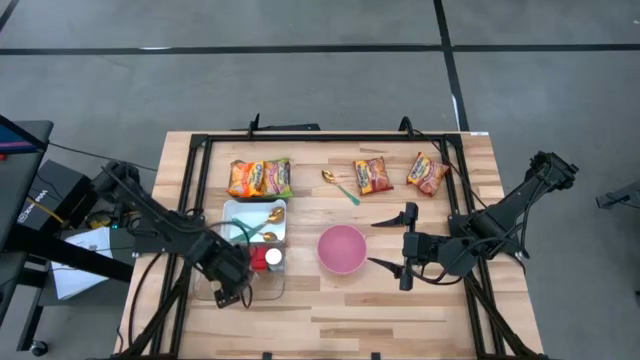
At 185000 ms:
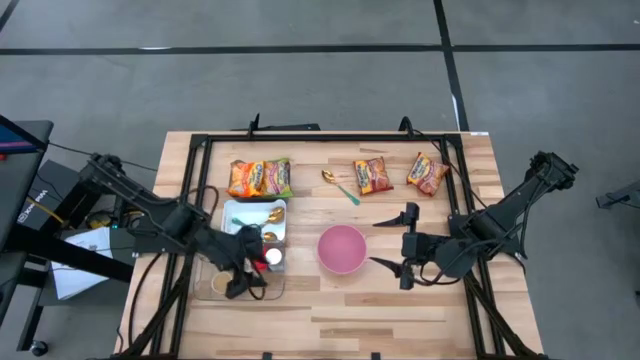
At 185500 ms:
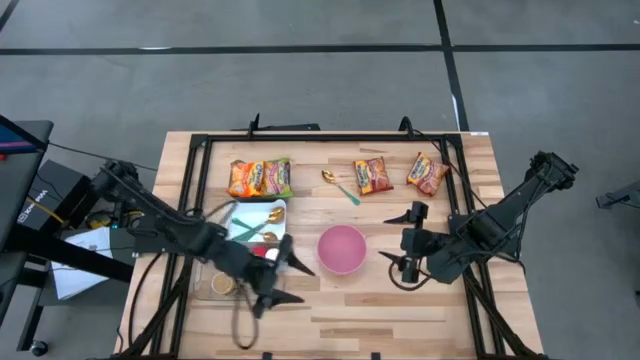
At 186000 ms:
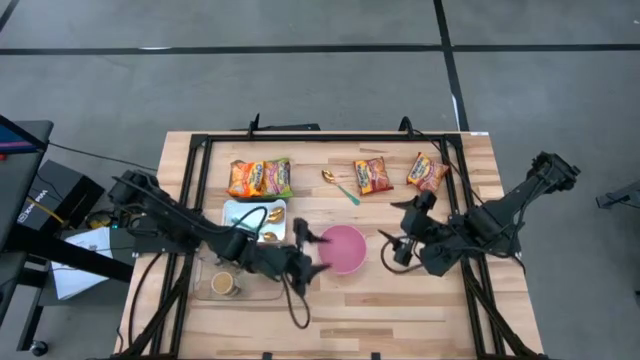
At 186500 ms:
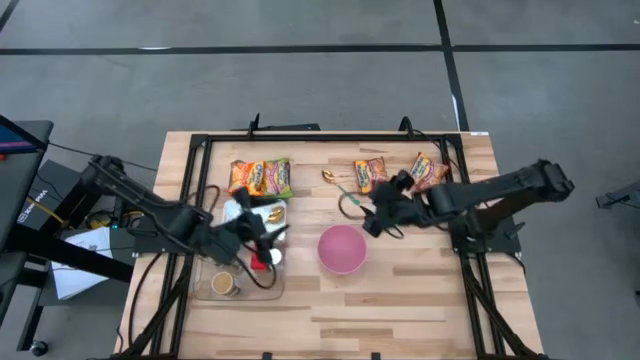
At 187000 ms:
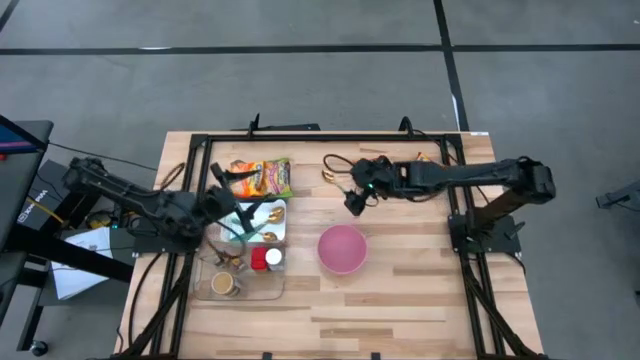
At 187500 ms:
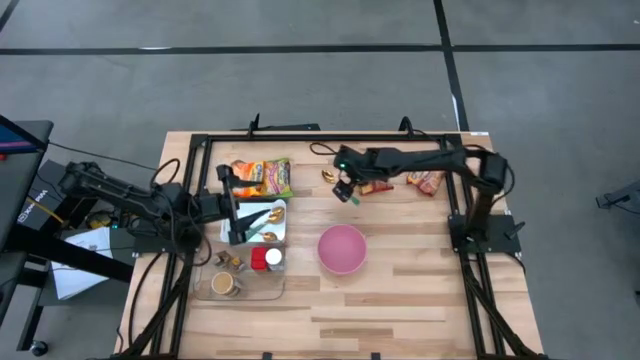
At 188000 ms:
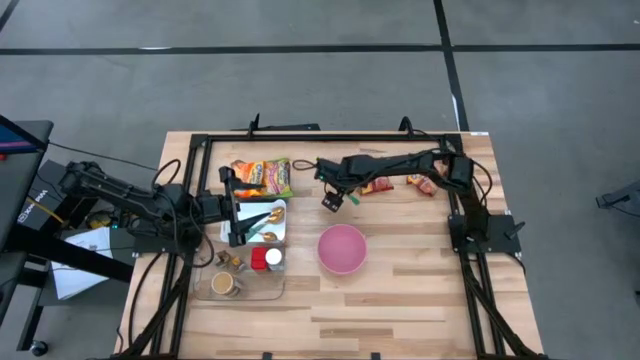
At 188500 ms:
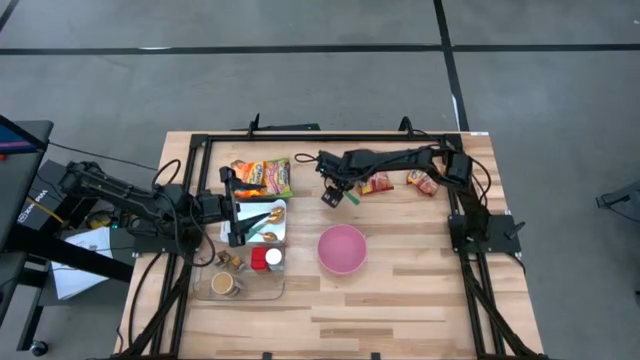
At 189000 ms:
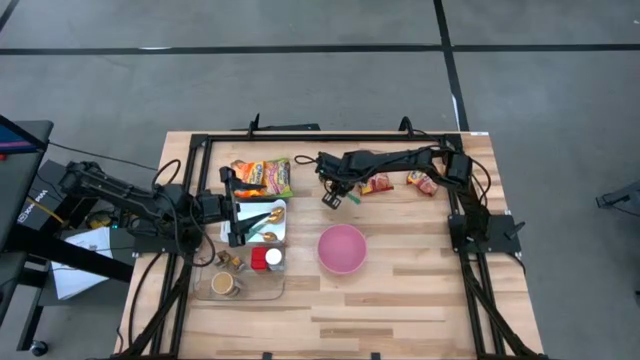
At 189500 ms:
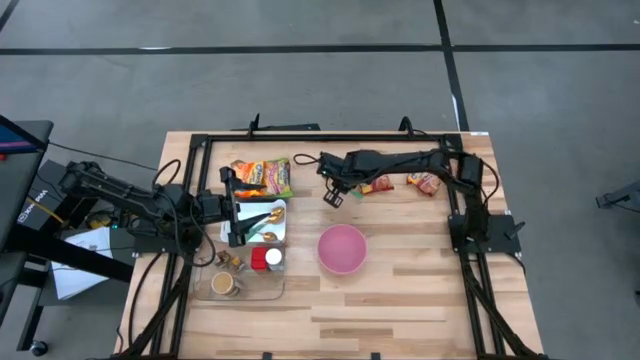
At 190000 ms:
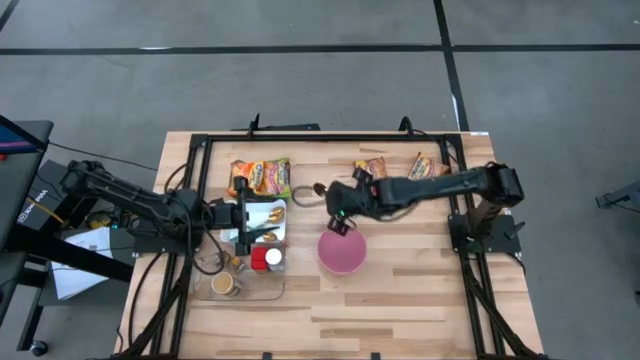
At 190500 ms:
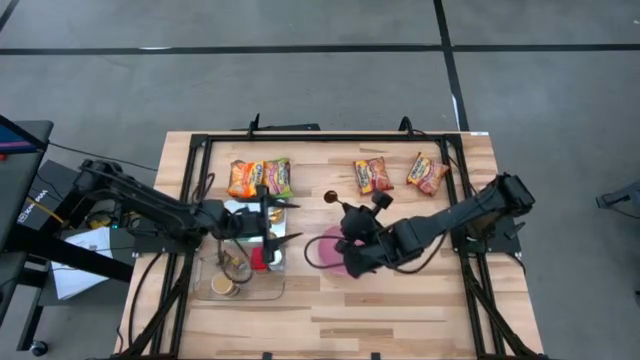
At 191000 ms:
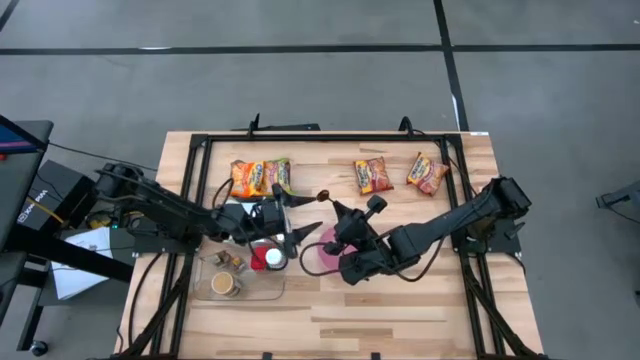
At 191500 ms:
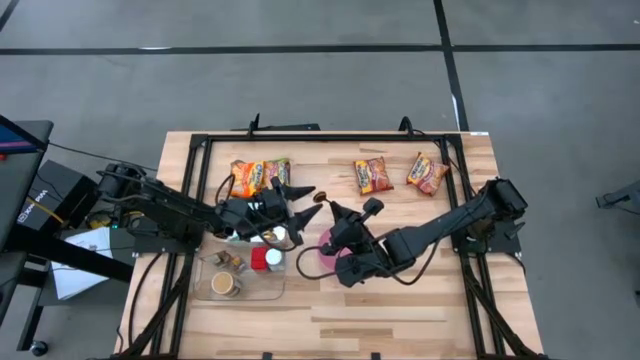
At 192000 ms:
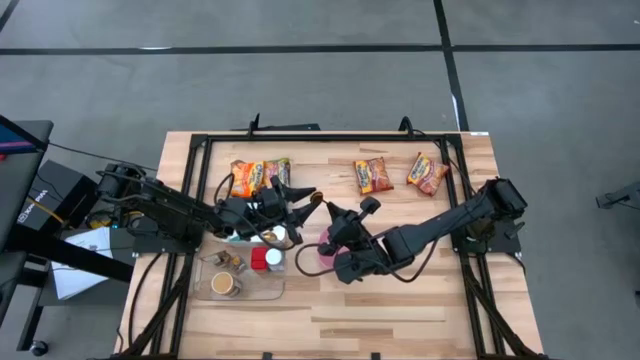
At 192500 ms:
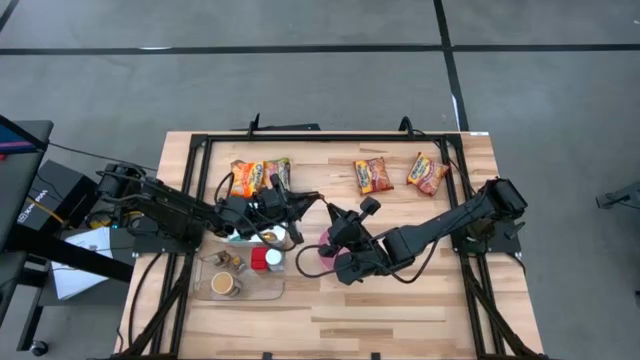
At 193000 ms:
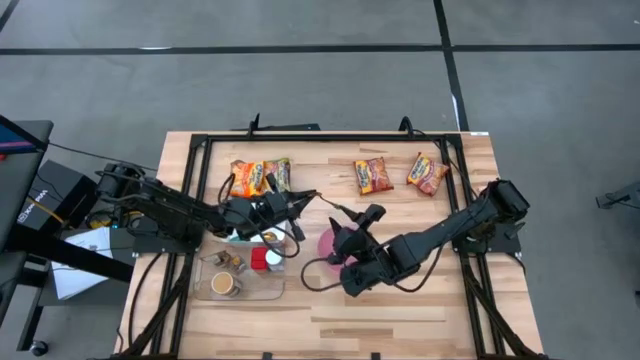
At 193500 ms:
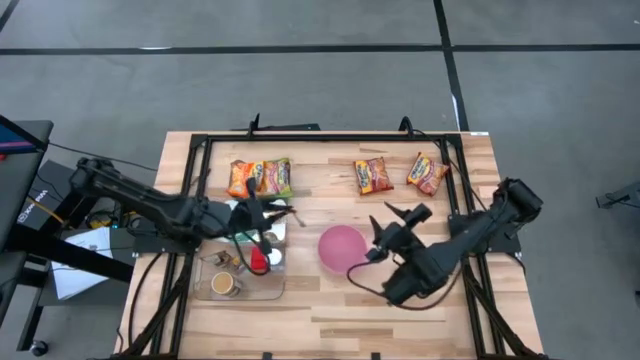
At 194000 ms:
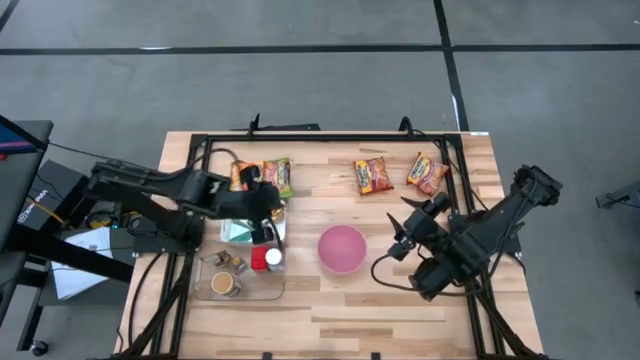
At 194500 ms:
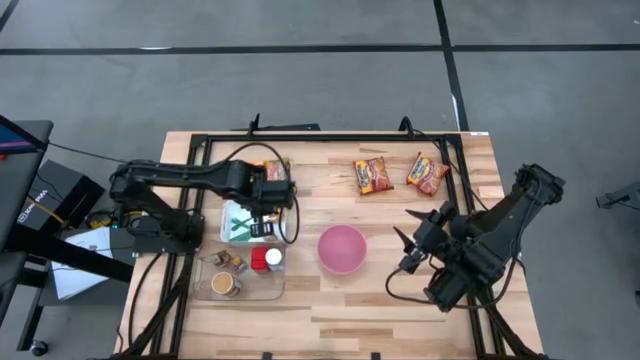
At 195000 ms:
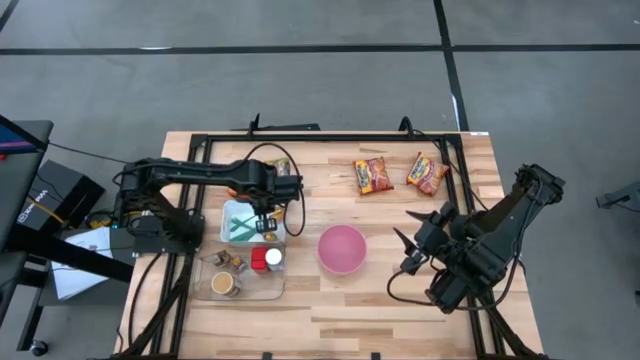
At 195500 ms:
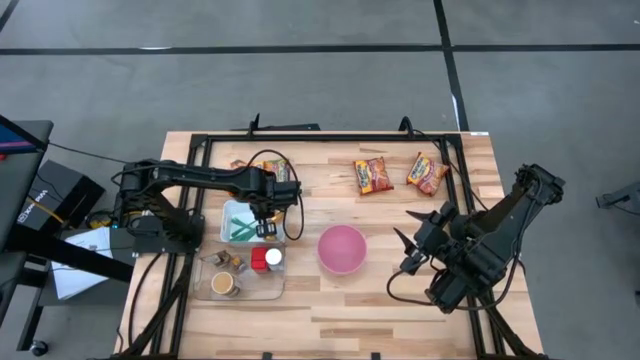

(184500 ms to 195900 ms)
Task: Pick & Place Food Item
Put the green spoon into the white bin

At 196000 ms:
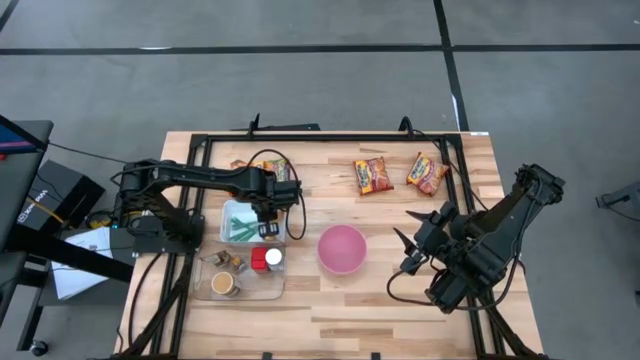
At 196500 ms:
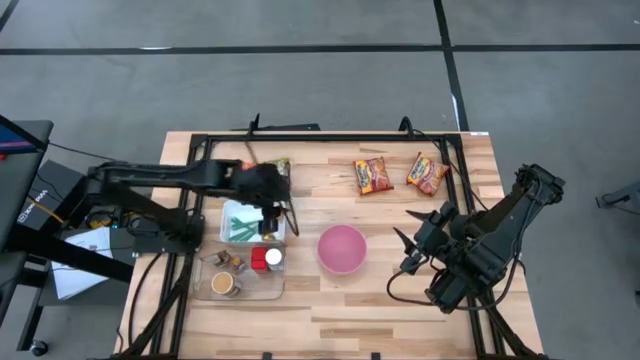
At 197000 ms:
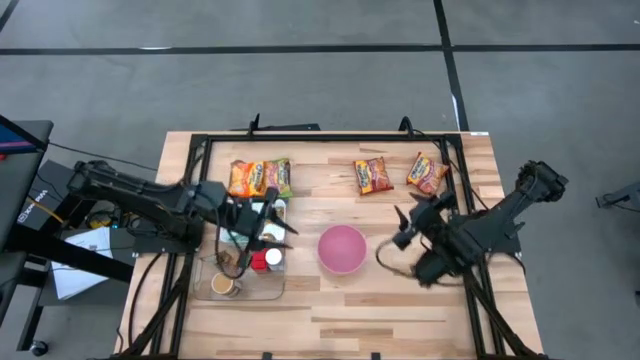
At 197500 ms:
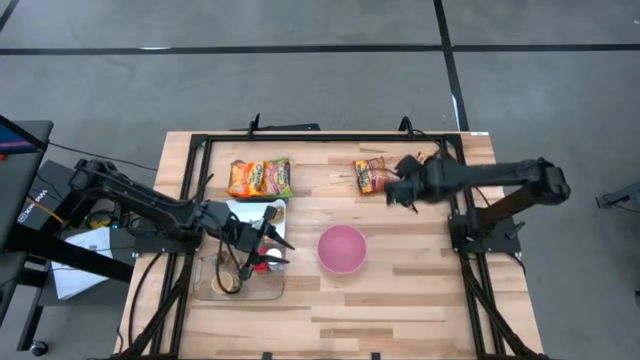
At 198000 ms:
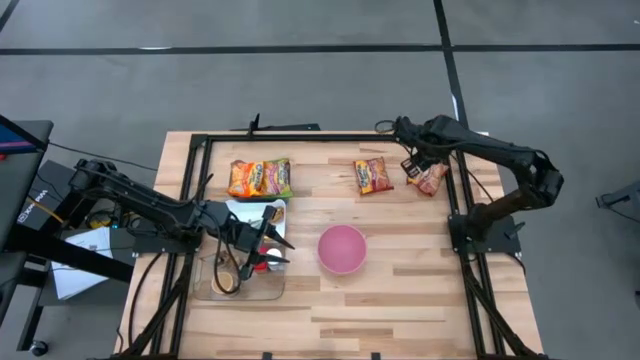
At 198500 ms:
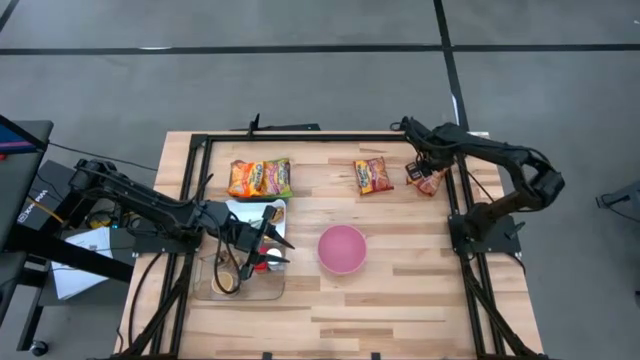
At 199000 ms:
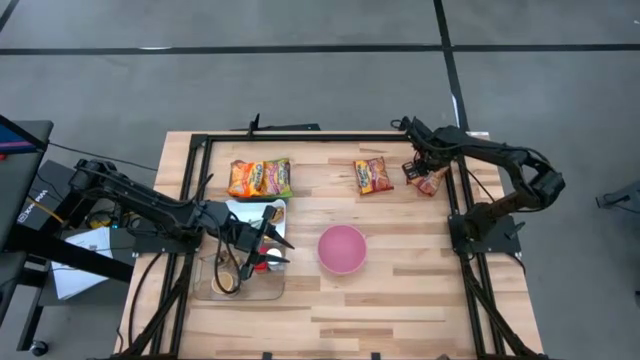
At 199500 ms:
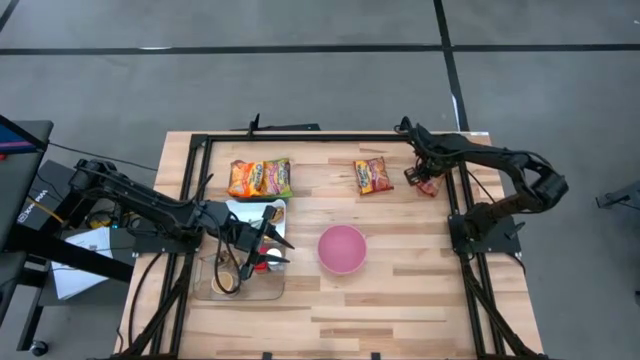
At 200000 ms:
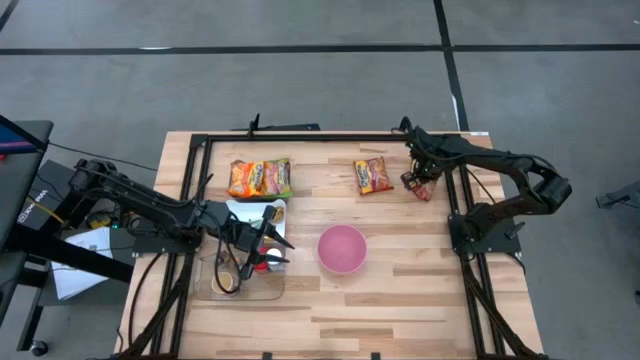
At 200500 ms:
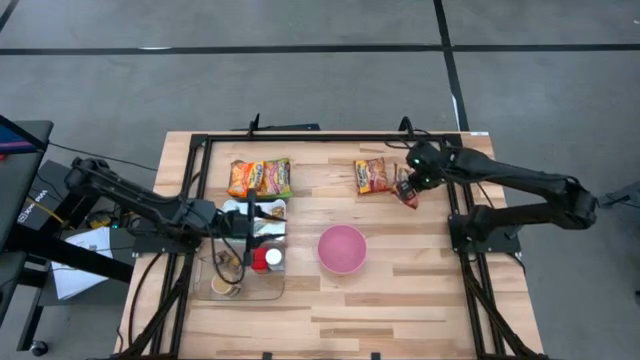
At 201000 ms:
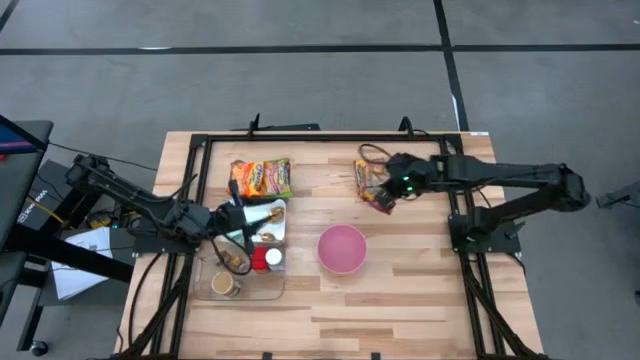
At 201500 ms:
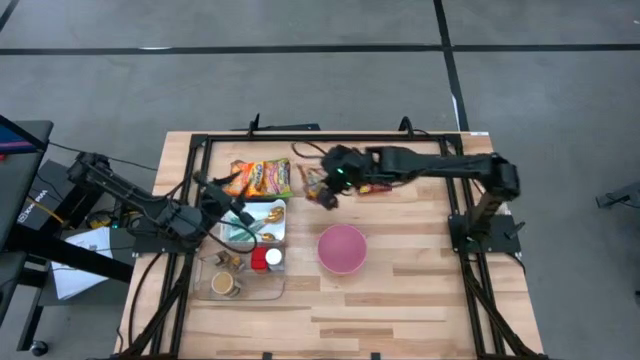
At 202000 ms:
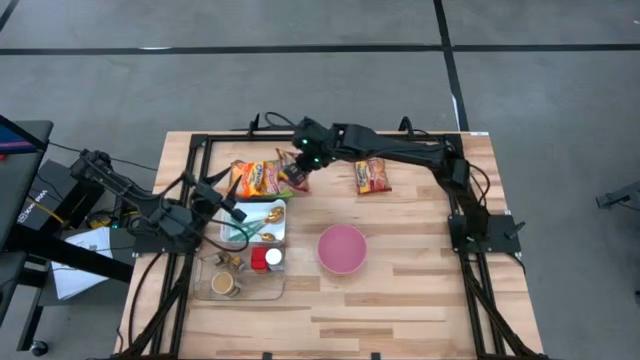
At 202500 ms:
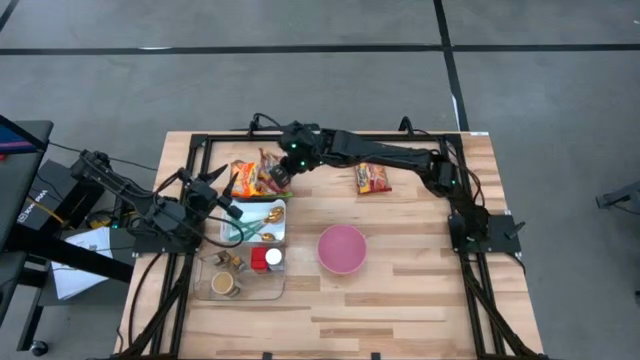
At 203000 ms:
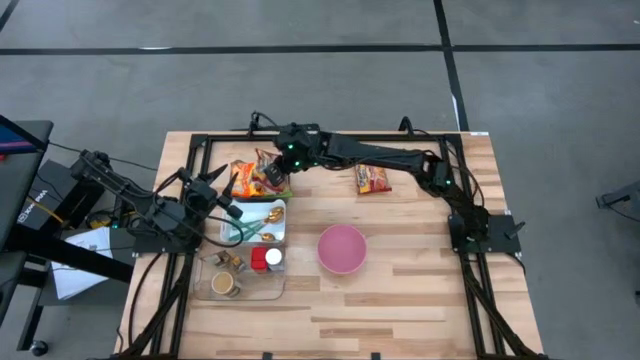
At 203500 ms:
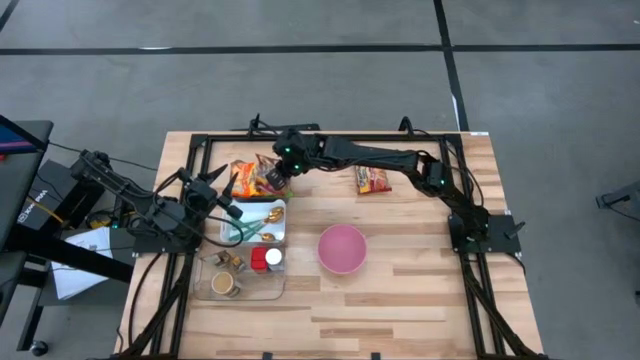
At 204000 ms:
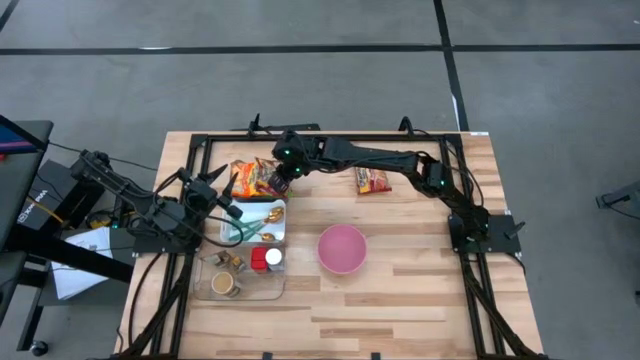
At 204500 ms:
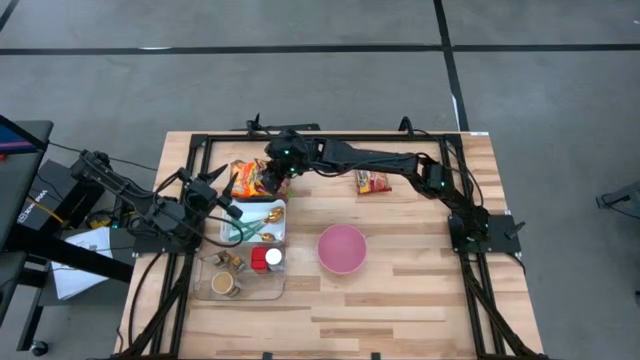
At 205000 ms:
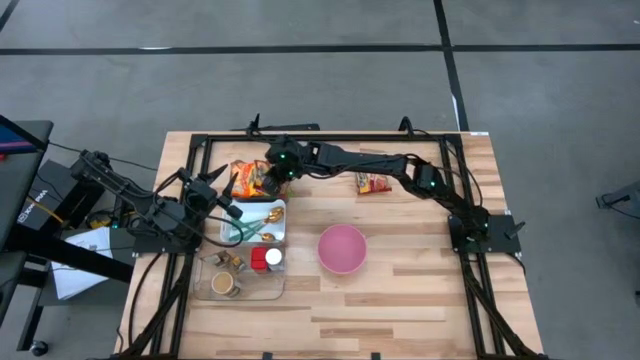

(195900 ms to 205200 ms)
Put the red noodle pack into the black transparent bin

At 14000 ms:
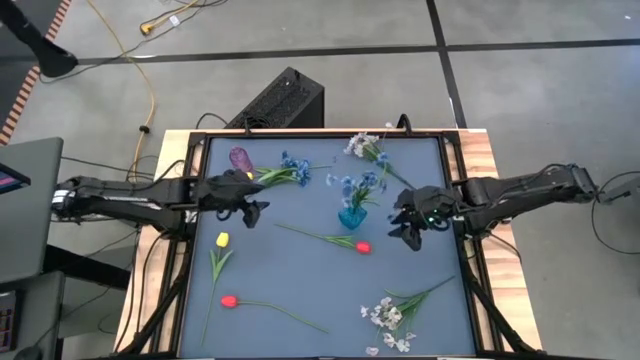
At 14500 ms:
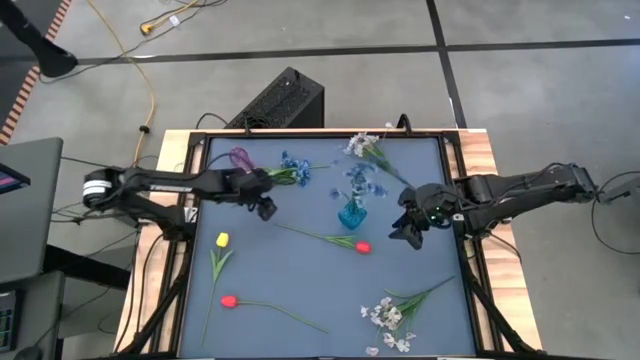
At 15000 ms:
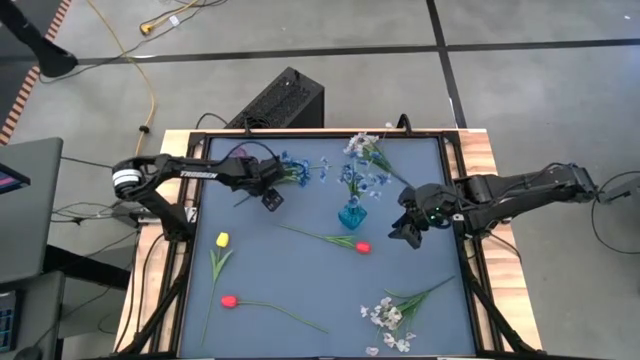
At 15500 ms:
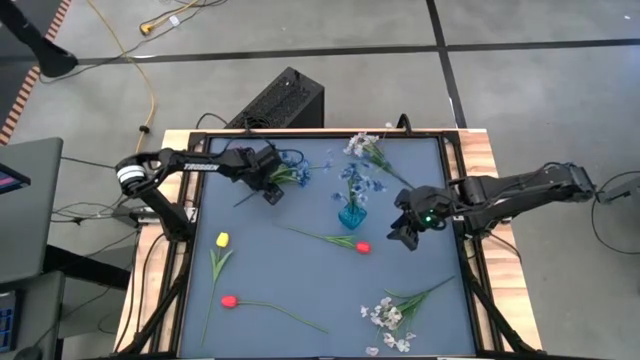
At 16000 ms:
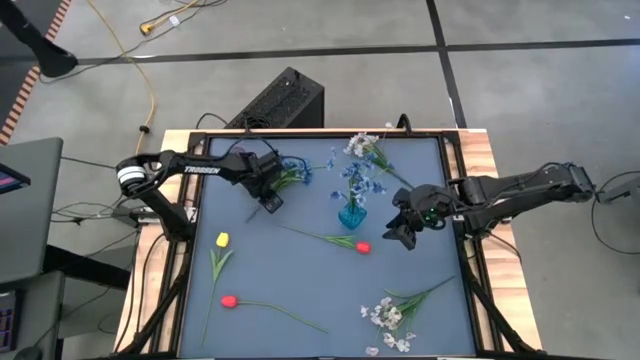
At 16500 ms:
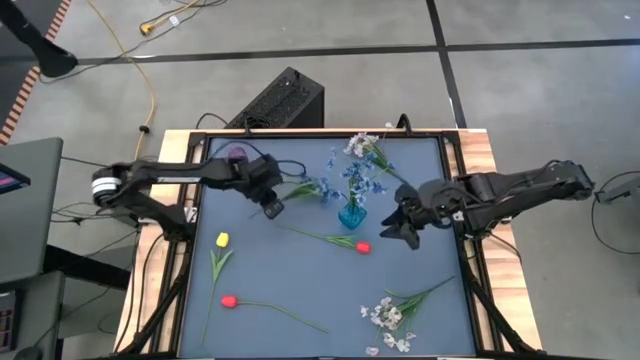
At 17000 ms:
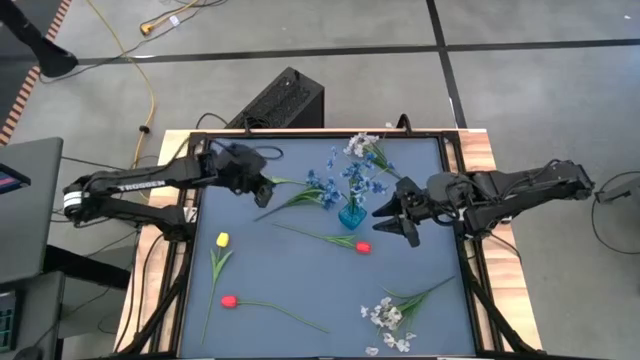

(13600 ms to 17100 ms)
Task: Sort flowers into vase by color
Put the blue flowers into the blue vase
